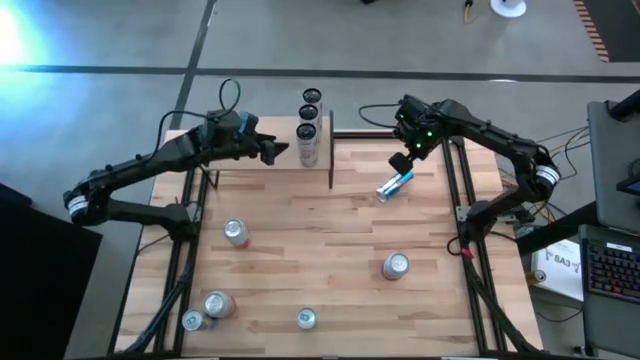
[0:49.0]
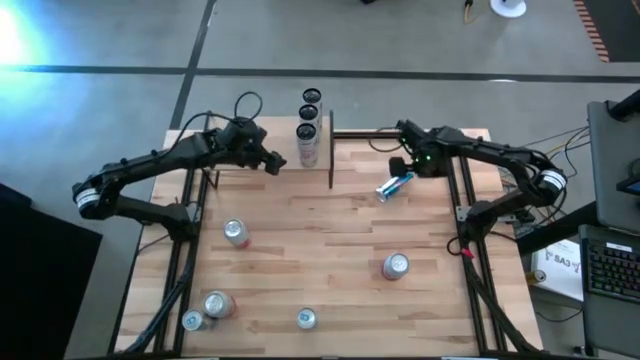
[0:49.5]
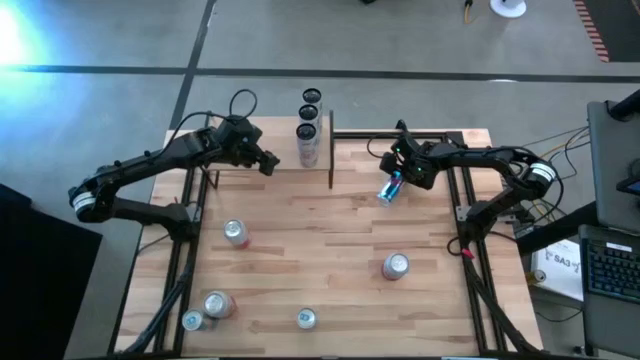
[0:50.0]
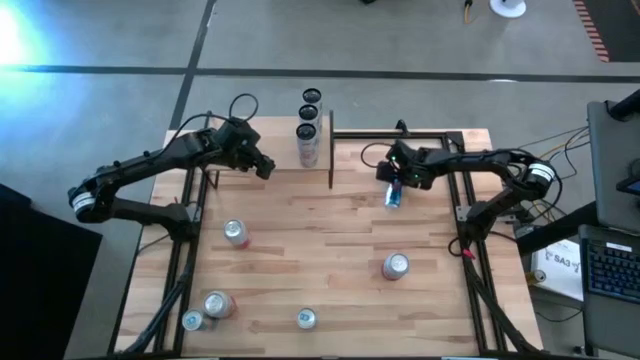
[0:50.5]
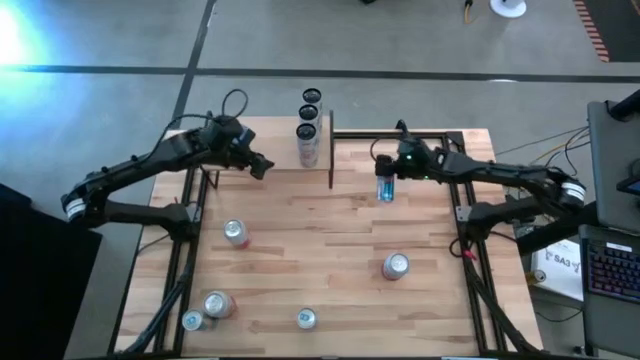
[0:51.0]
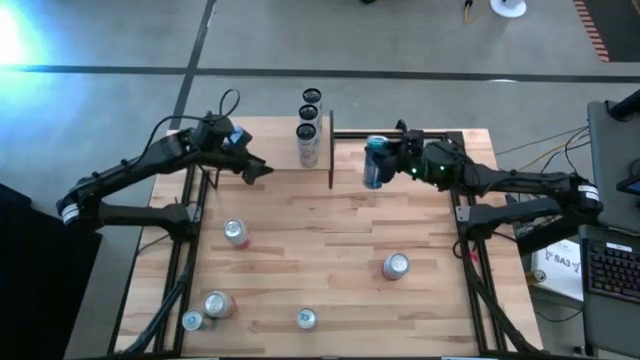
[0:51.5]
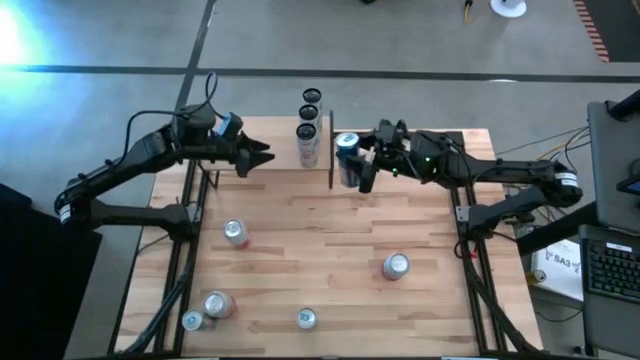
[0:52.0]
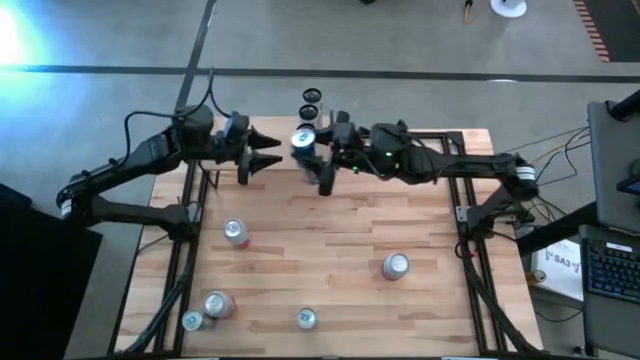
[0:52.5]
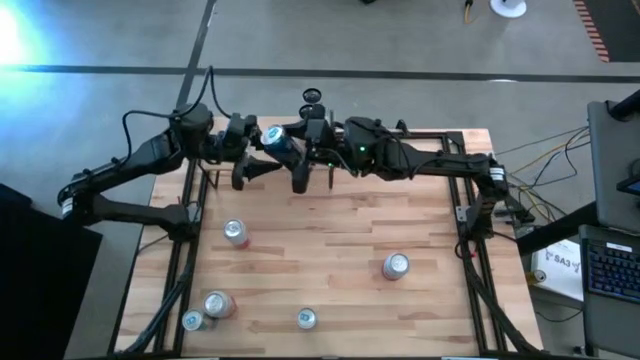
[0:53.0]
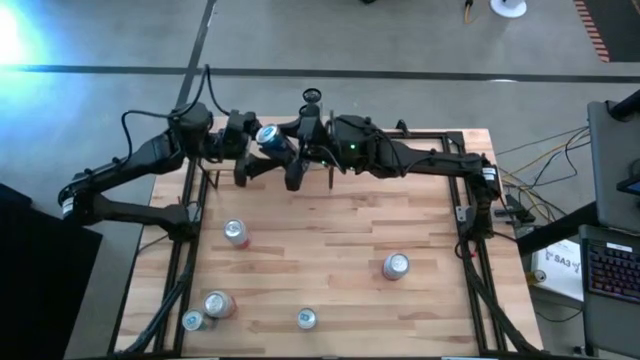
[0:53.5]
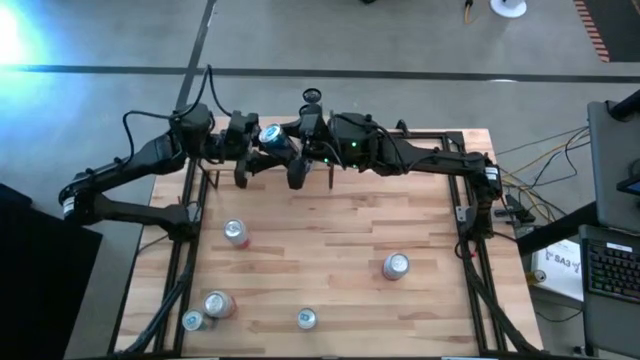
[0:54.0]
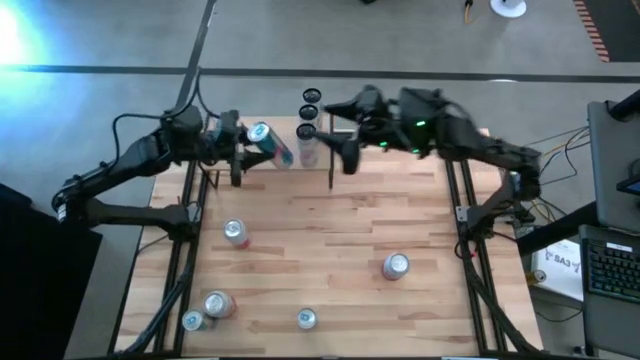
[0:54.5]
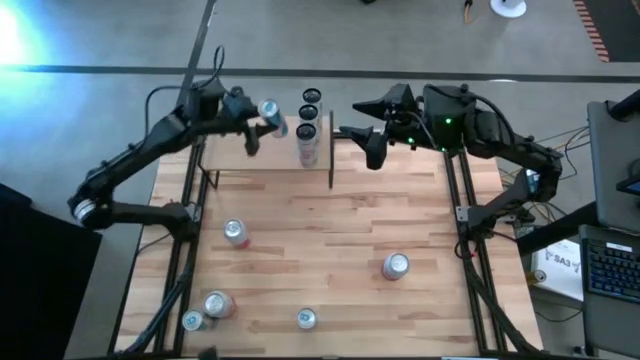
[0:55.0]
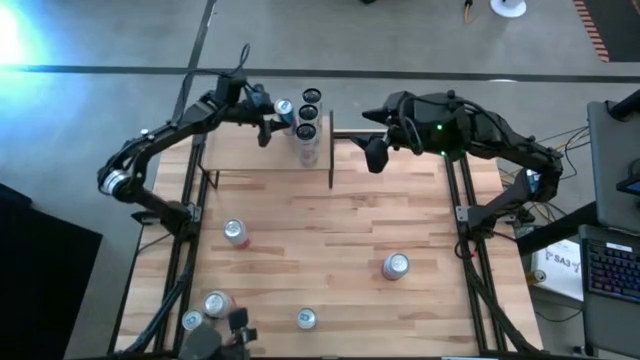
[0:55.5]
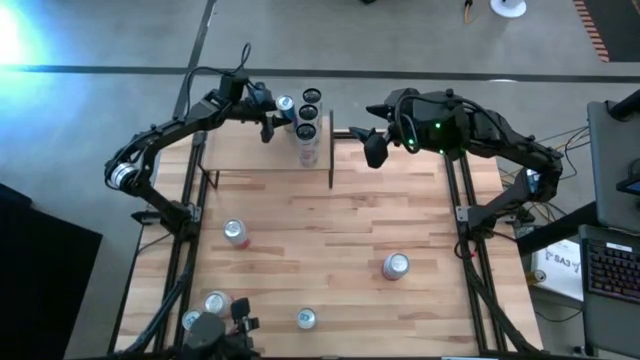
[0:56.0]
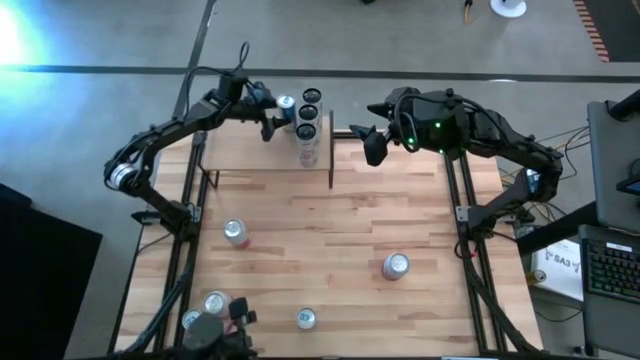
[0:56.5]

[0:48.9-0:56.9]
Task: Place canned beverage on shelf
Put the top right blue soda can on the shelf

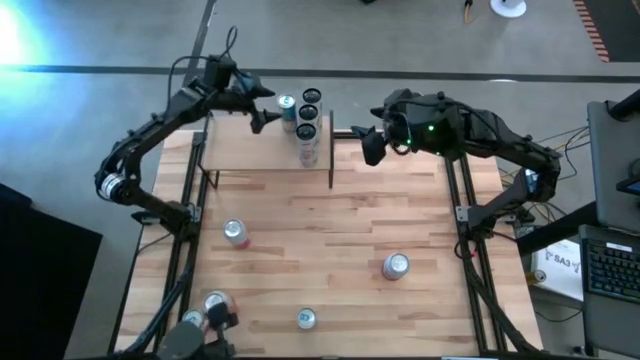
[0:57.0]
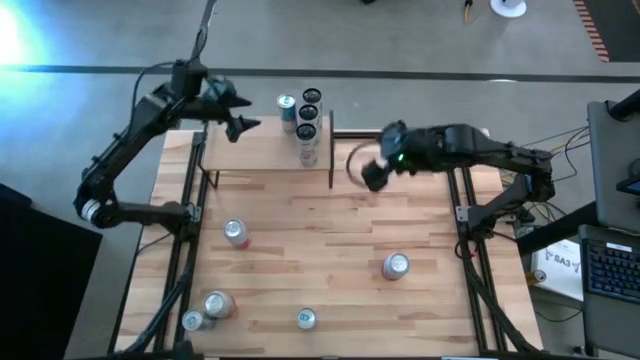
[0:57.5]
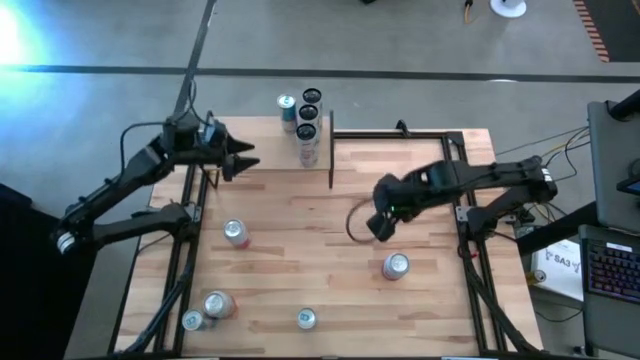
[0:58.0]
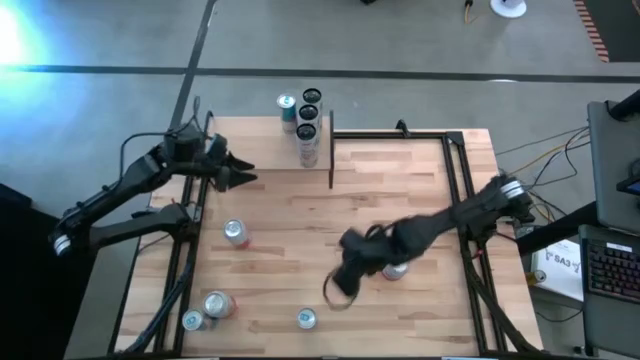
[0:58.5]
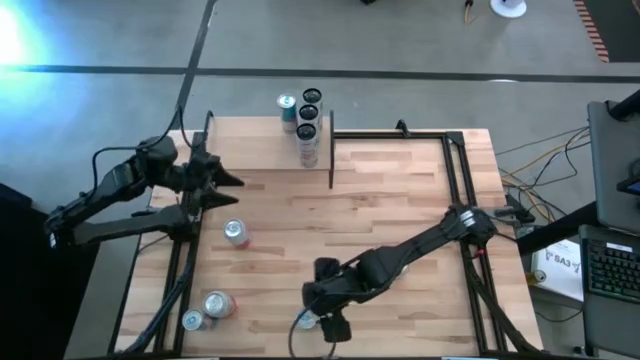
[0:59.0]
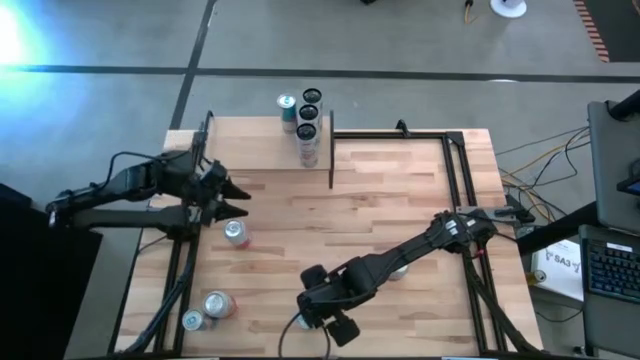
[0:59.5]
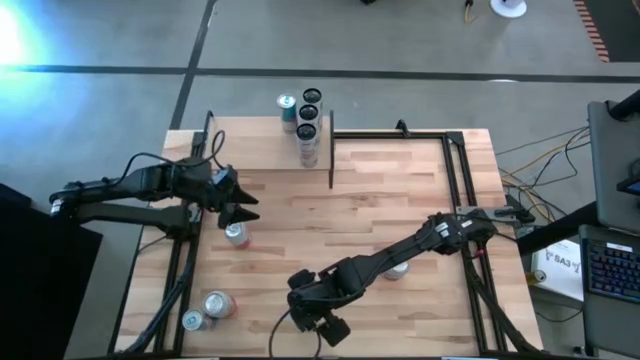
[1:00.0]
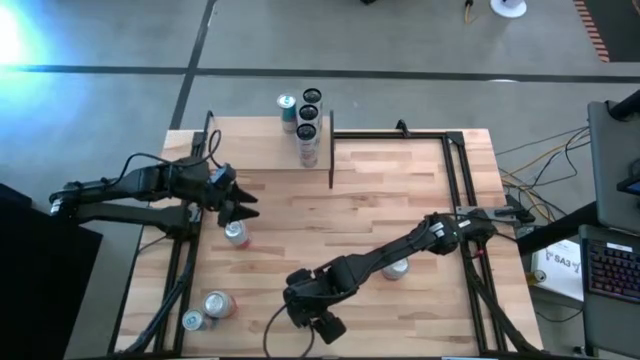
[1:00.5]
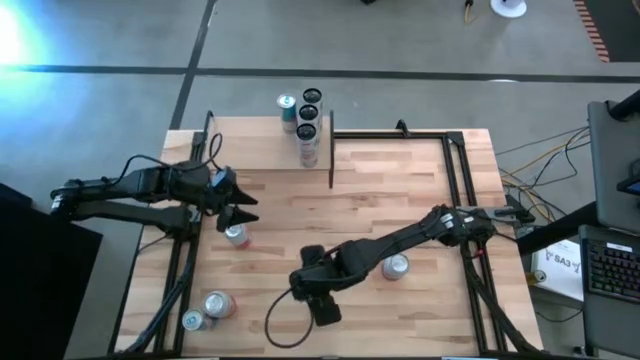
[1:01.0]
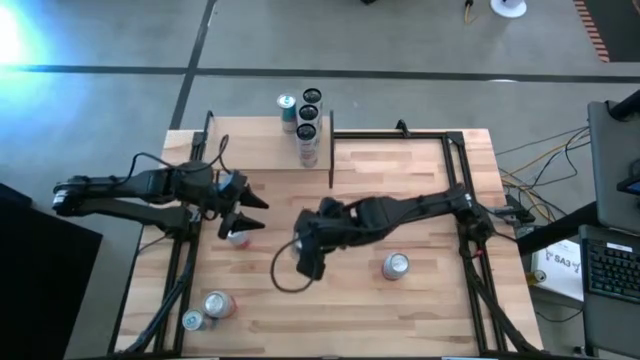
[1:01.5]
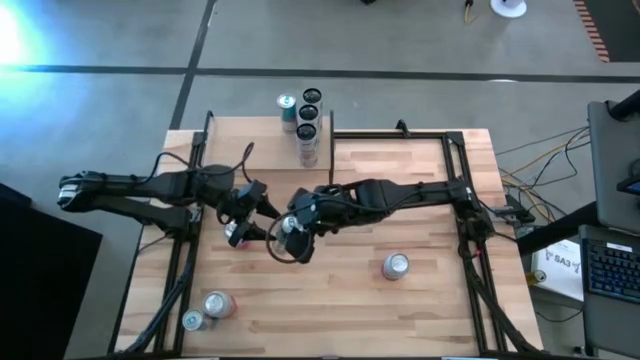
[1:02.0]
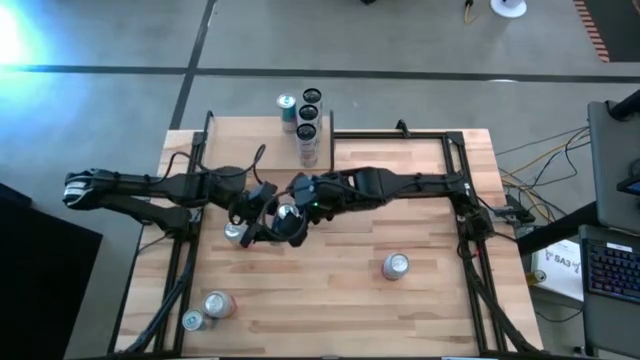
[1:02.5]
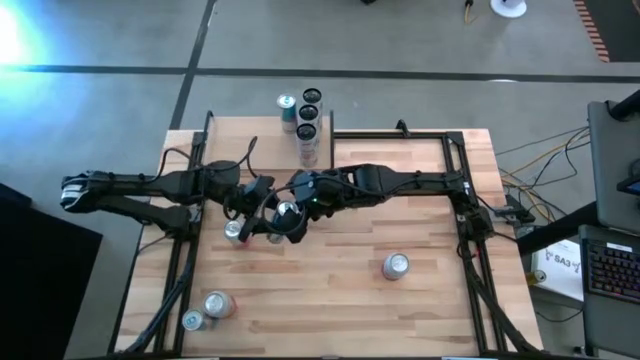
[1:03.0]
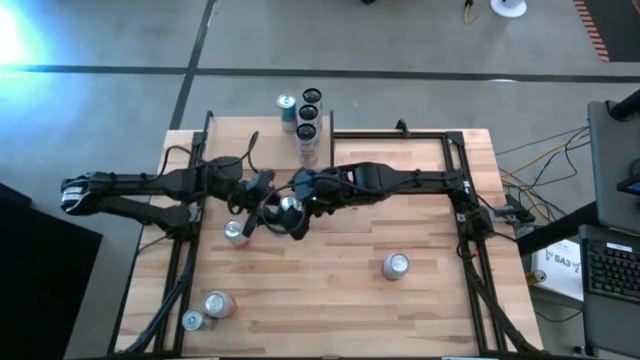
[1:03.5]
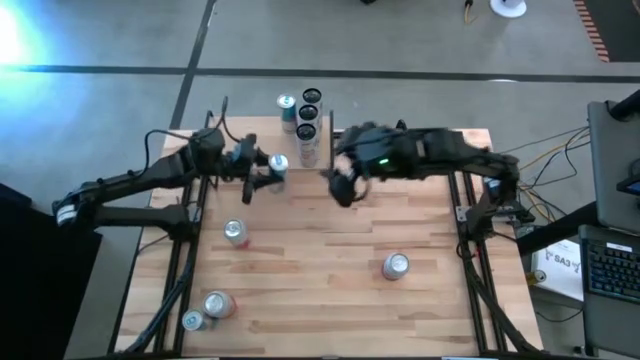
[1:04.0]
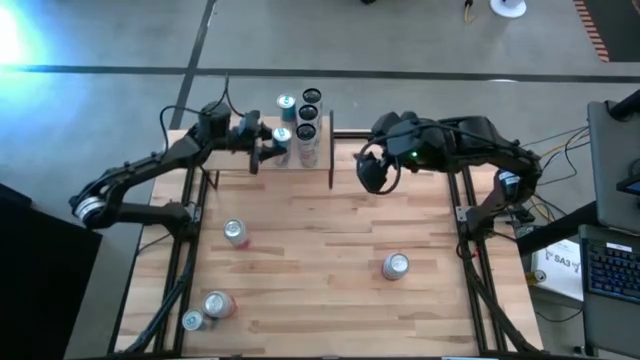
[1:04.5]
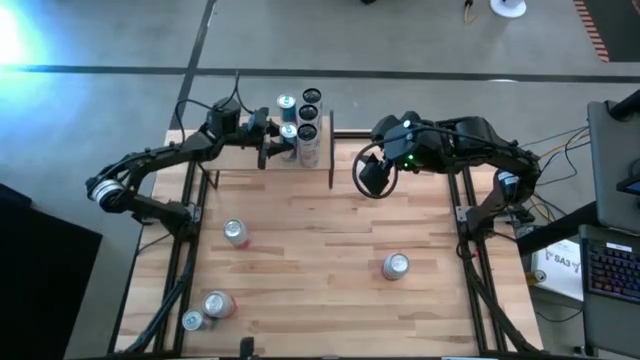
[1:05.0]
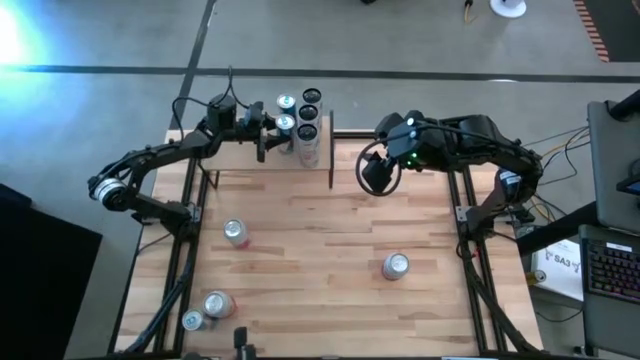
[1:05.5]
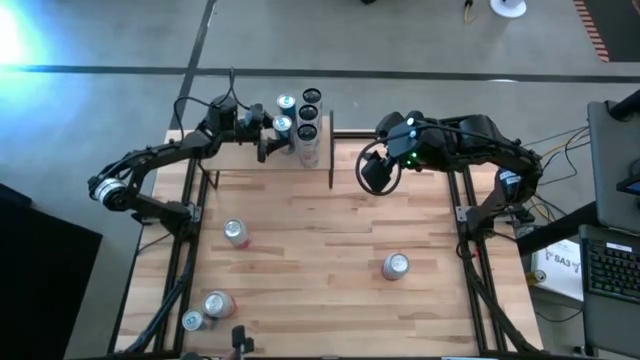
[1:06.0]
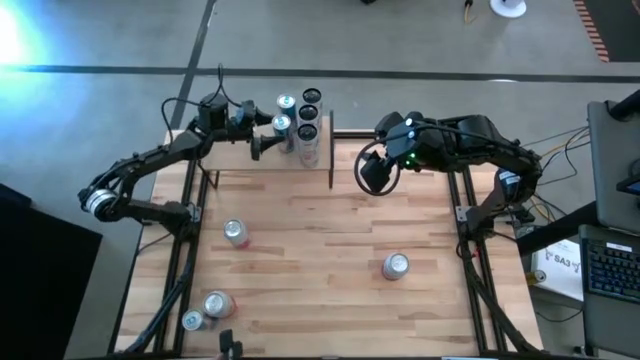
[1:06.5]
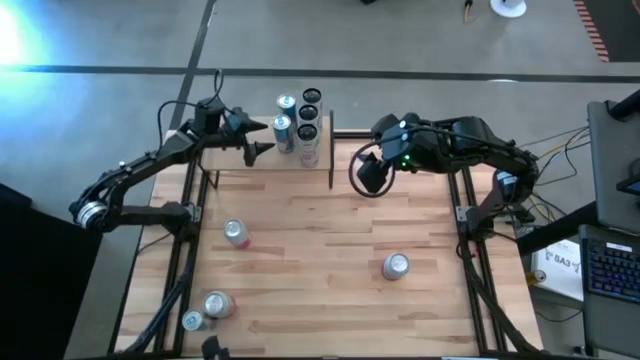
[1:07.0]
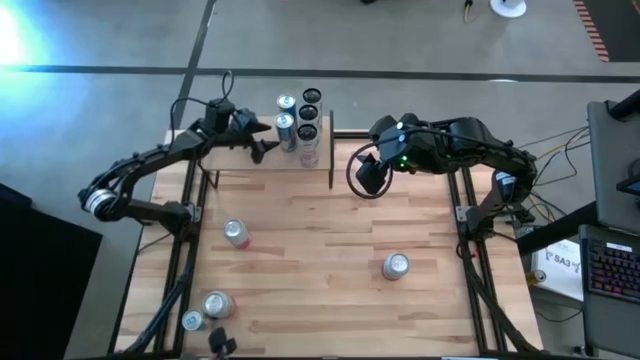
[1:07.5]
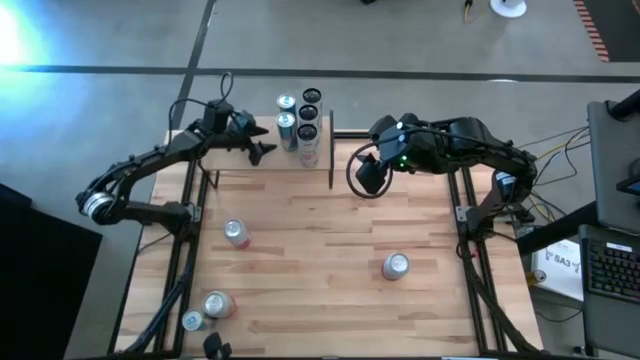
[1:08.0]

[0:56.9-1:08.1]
Put the right blue soda can on the shelf aligned with the other blue soda can

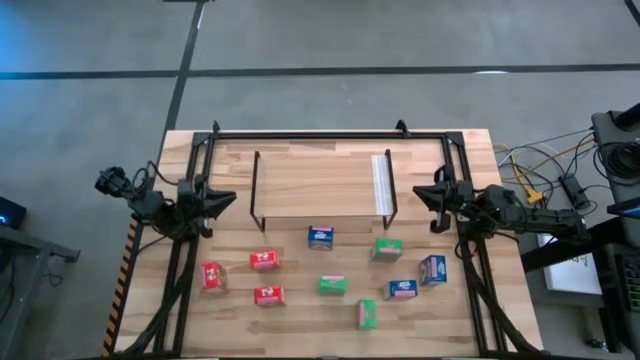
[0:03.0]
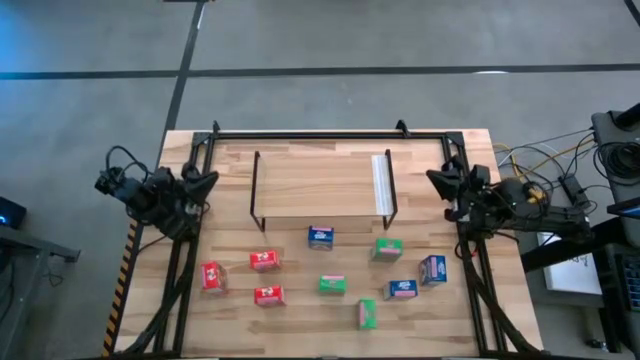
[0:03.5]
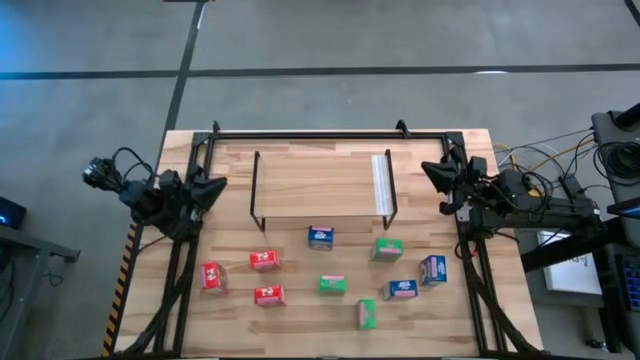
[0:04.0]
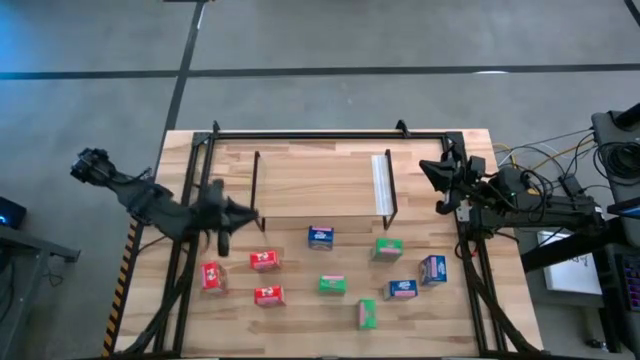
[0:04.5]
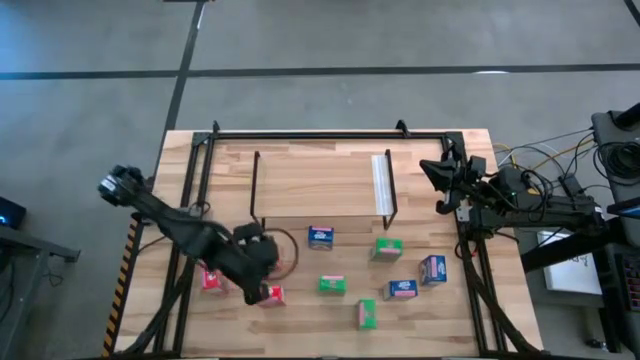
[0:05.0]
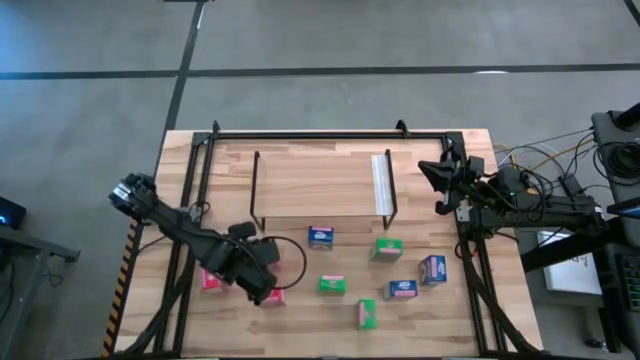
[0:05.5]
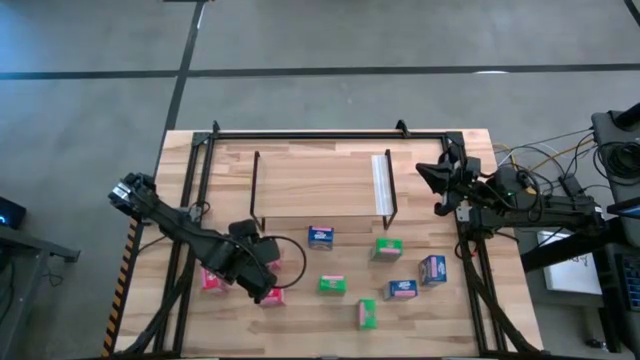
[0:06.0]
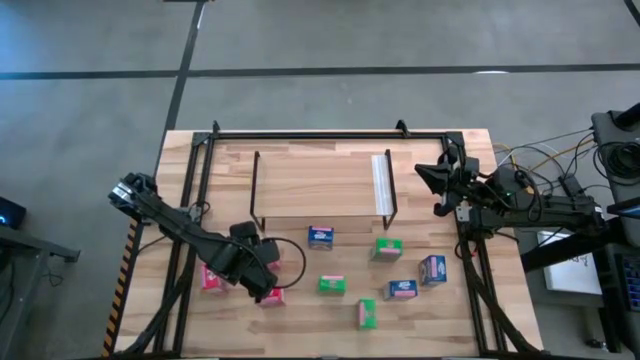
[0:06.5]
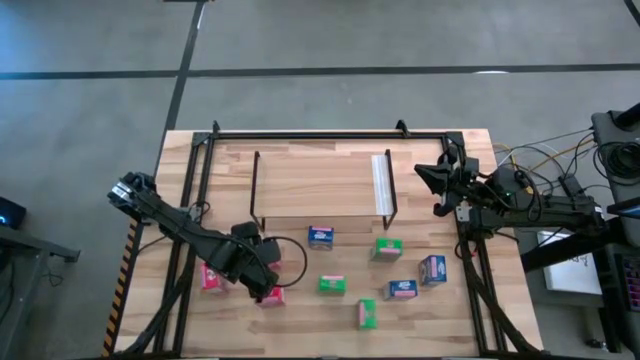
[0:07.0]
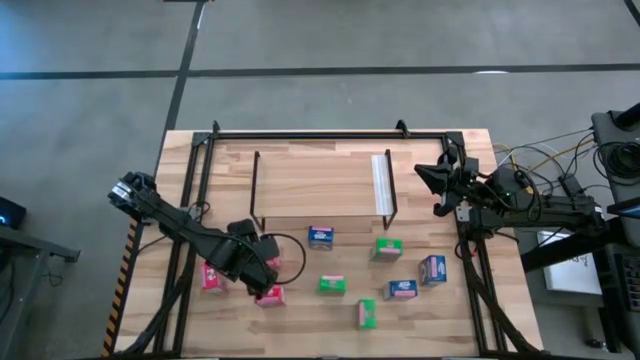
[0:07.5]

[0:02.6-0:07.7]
Task: Stack cereal on shelf
Put the top right red cereal box on the shelf
